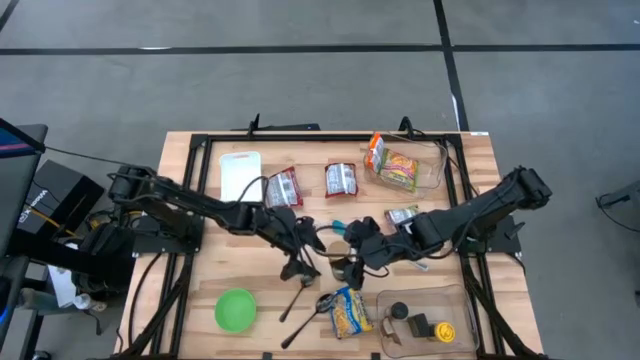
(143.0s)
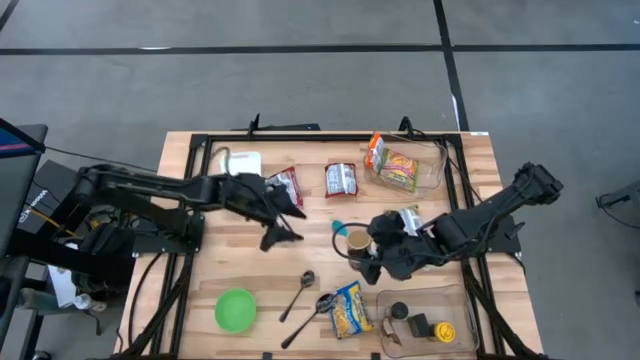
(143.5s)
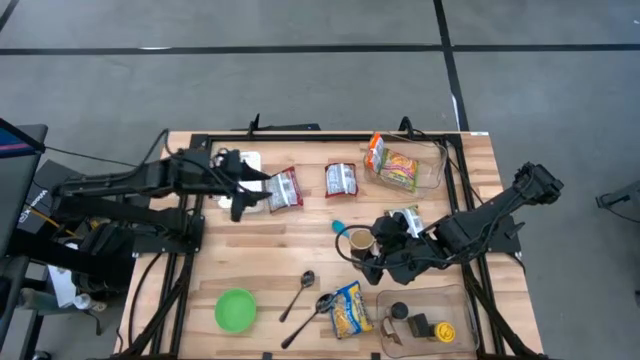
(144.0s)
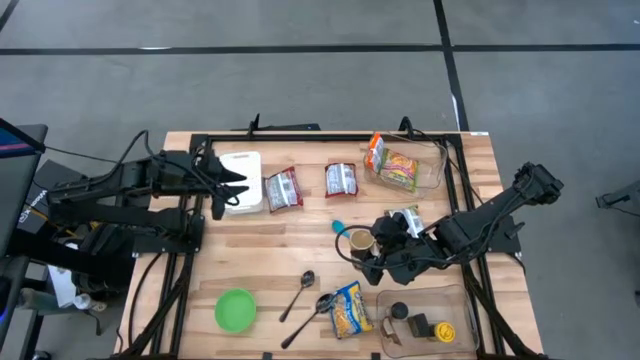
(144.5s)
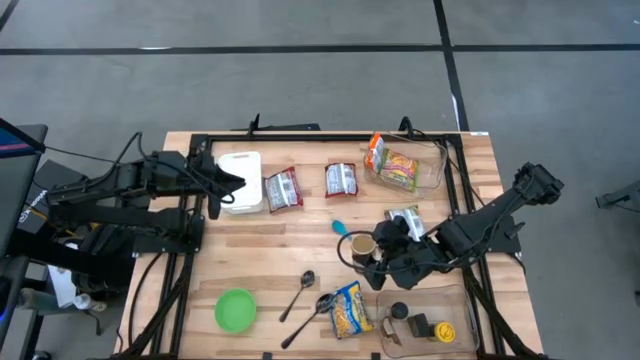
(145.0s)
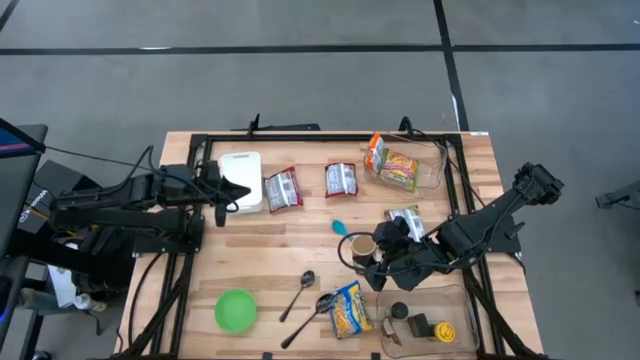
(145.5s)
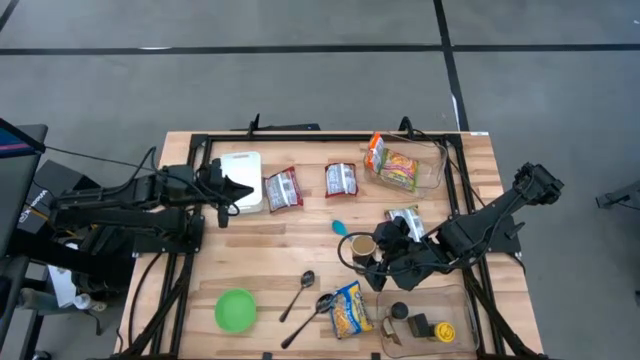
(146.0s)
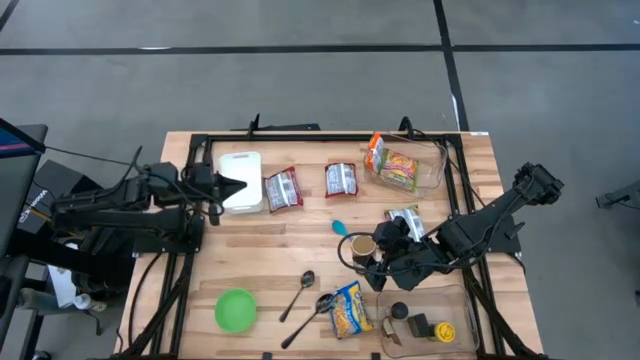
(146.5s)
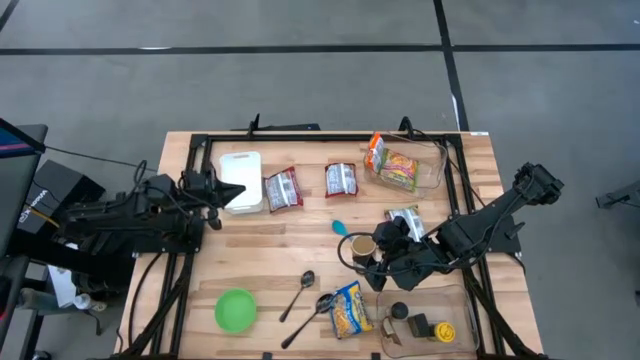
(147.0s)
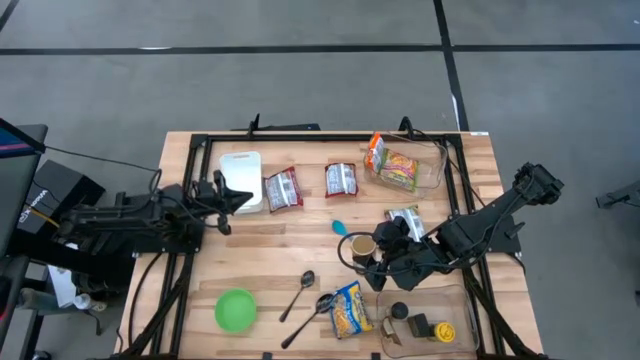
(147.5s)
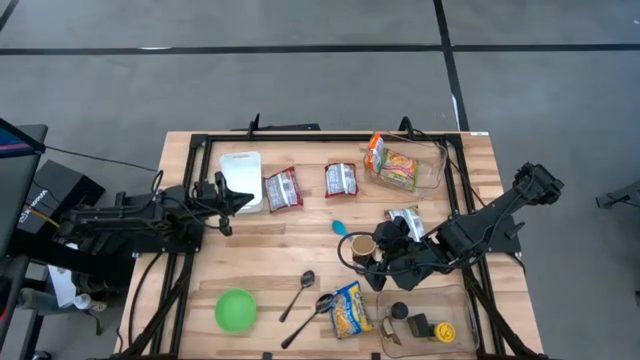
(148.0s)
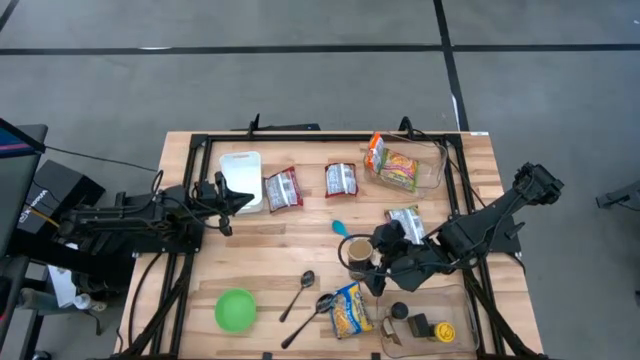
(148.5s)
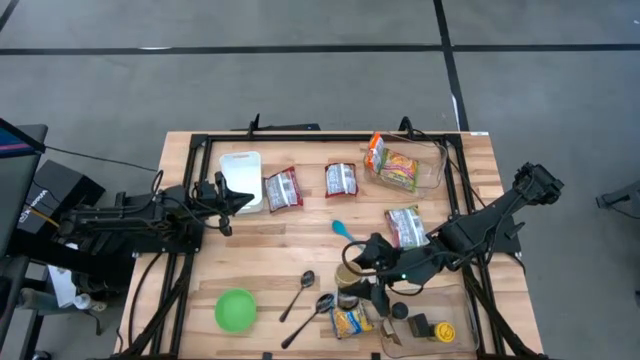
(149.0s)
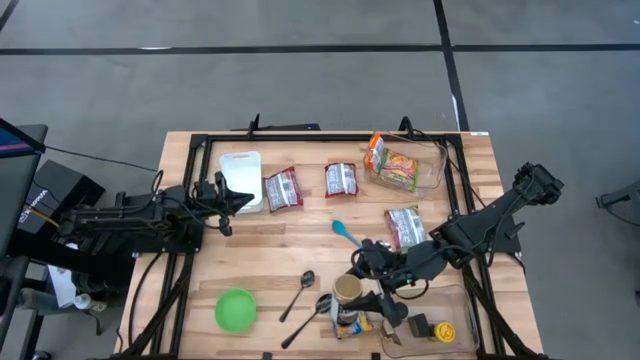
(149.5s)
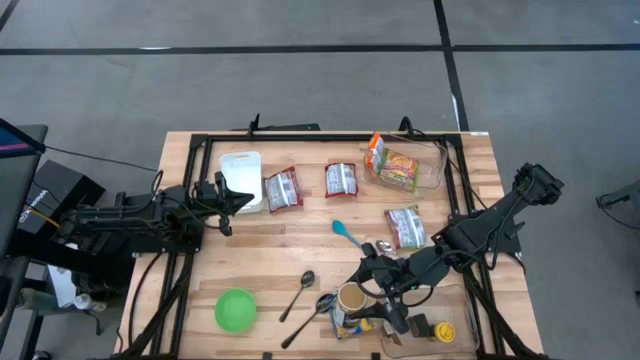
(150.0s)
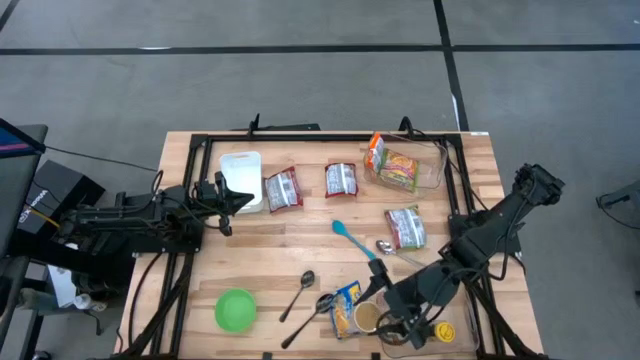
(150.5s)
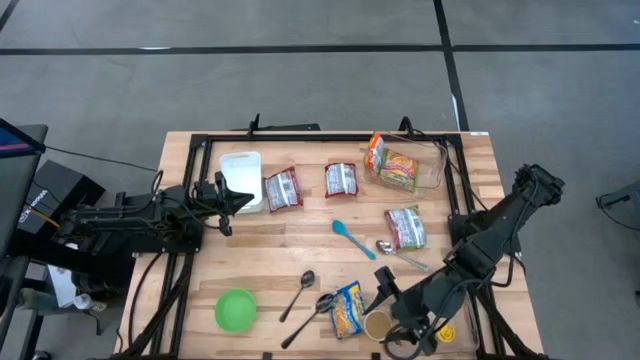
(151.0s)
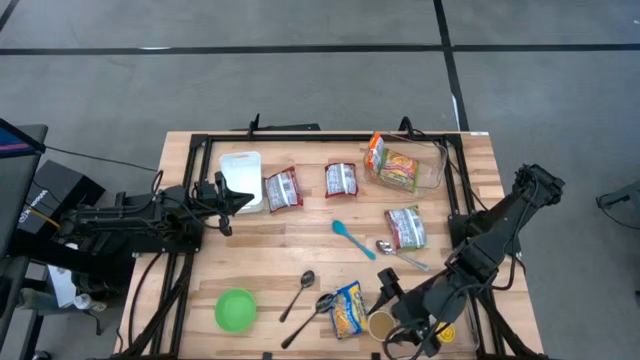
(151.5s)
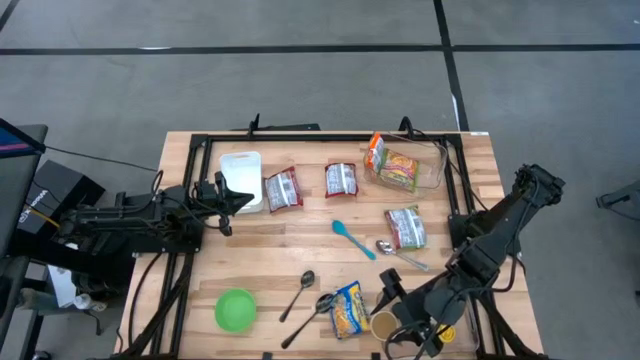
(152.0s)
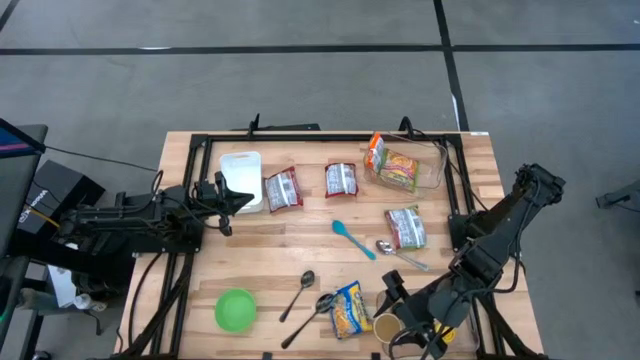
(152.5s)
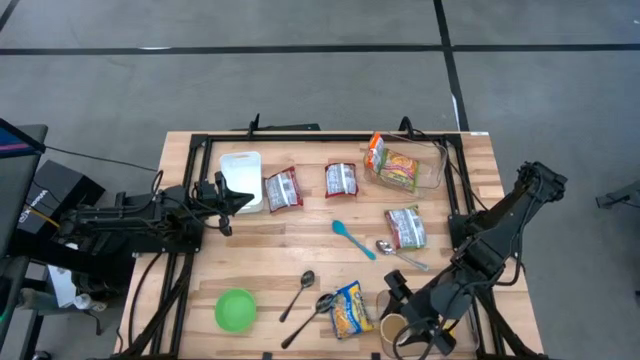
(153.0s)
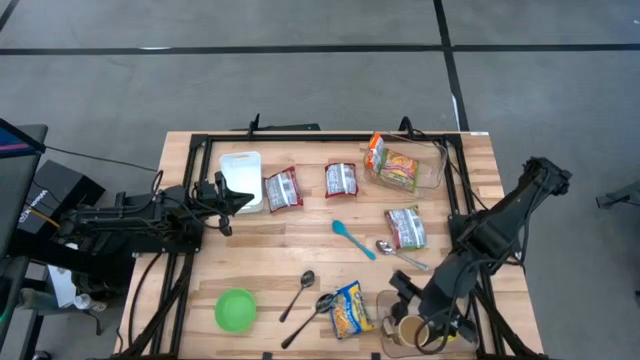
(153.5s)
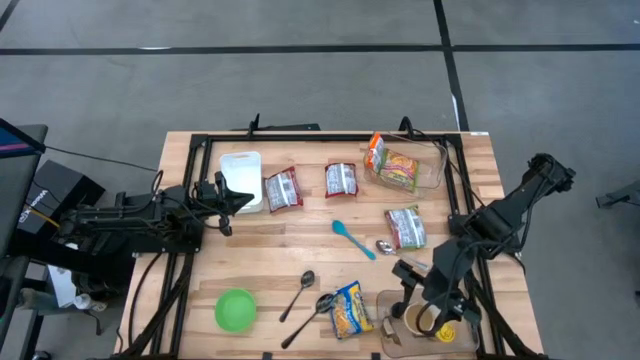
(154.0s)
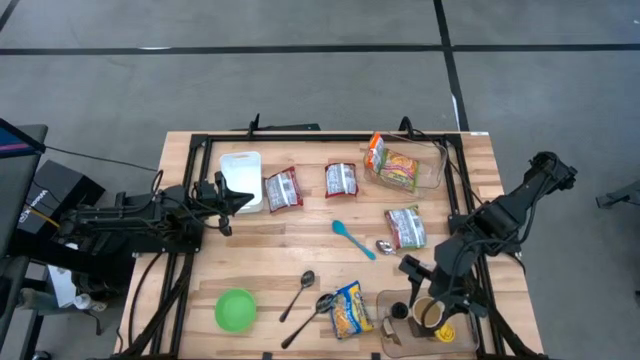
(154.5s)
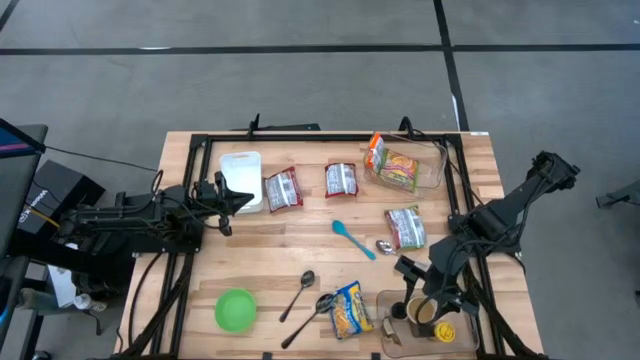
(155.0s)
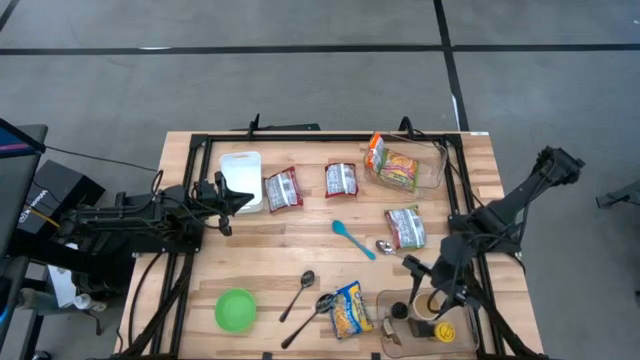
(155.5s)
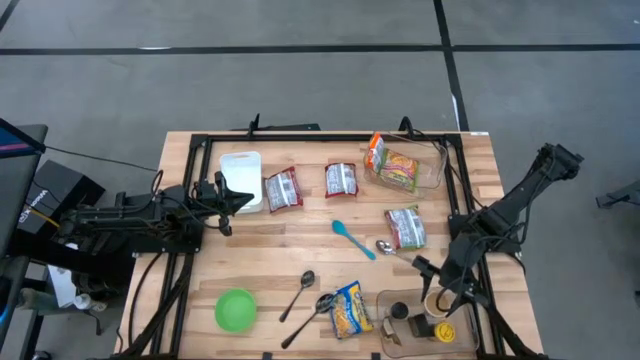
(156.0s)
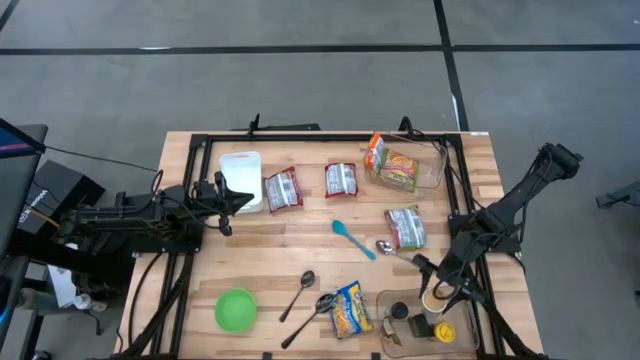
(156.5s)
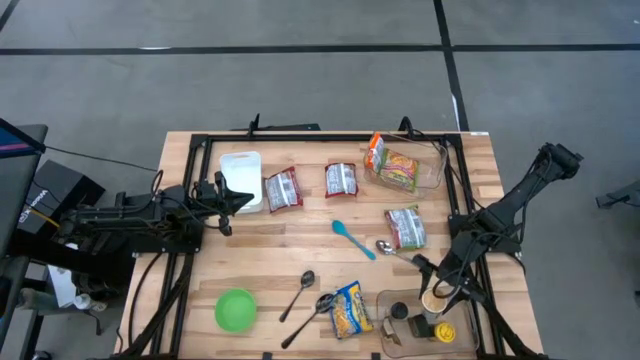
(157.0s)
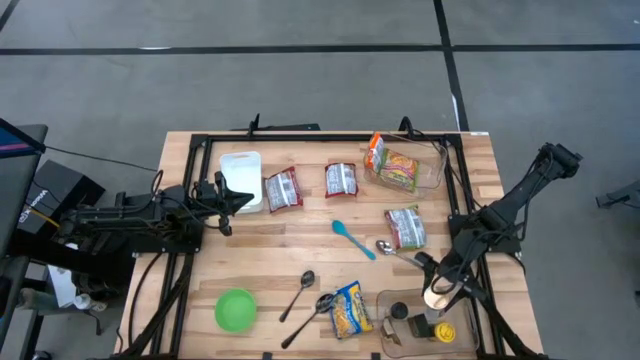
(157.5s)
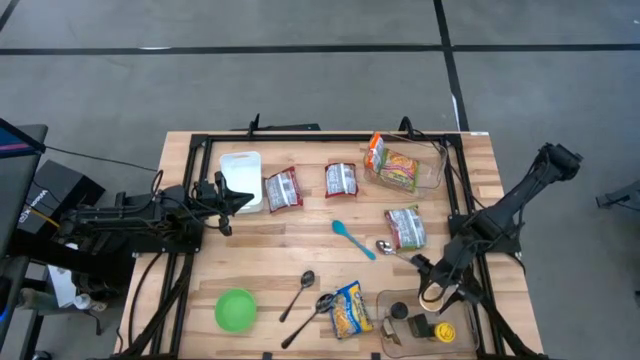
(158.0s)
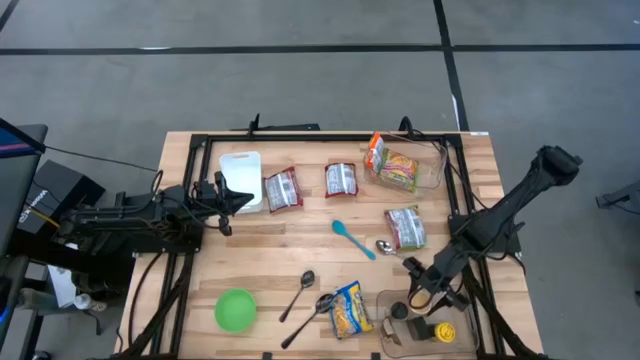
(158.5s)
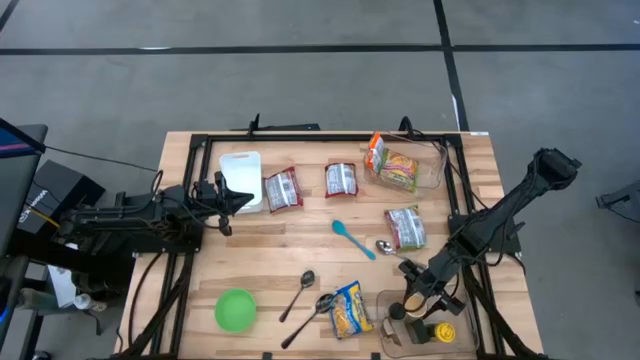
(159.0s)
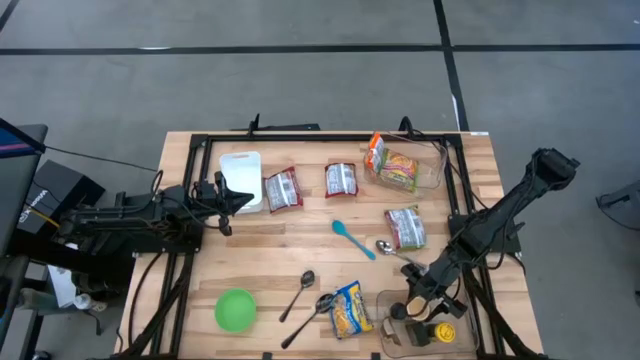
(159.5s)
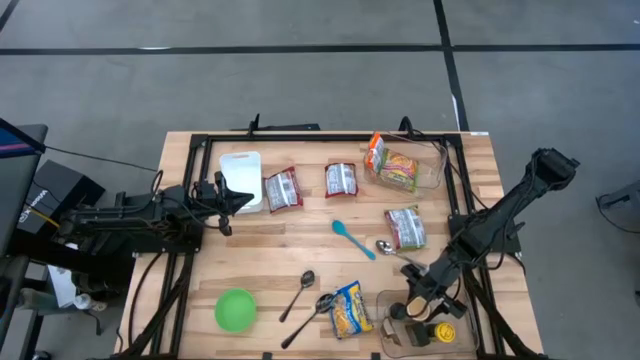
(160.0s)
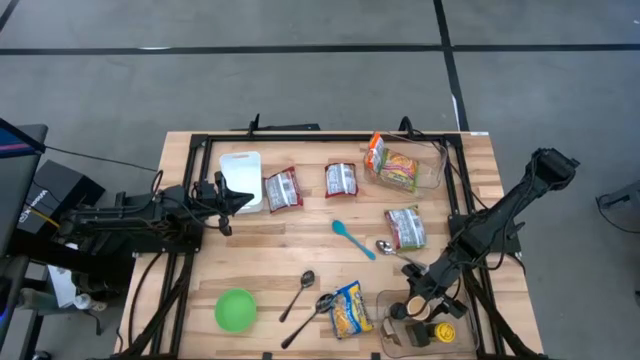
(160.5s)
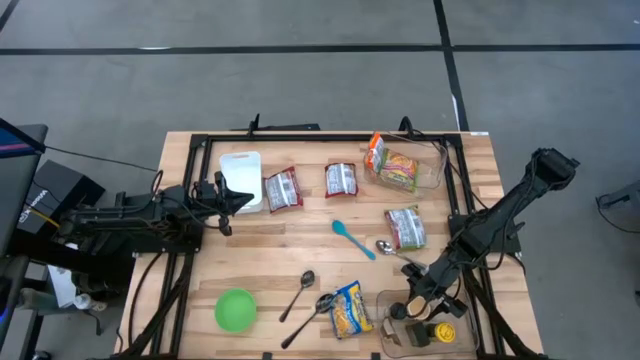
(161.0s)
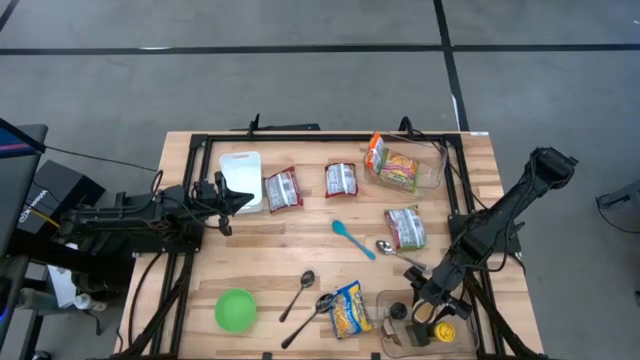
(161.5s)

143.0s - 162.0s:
Task: Pick & Place Food Item
Put the golden spice bottle into the bottom transparent bin

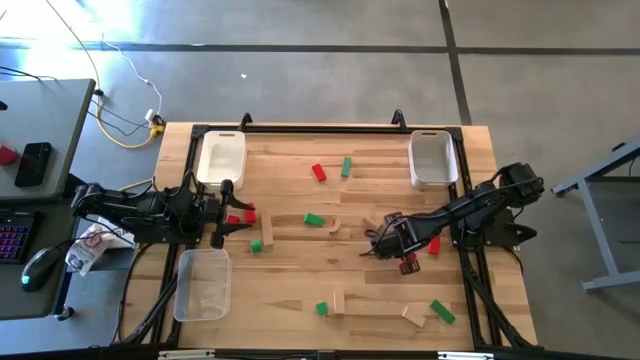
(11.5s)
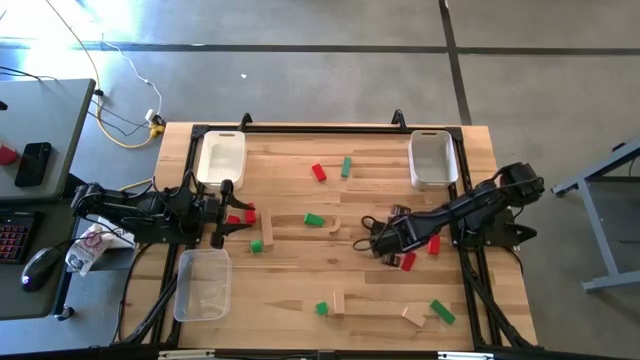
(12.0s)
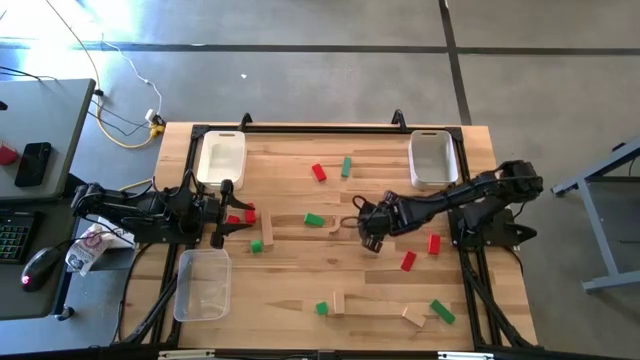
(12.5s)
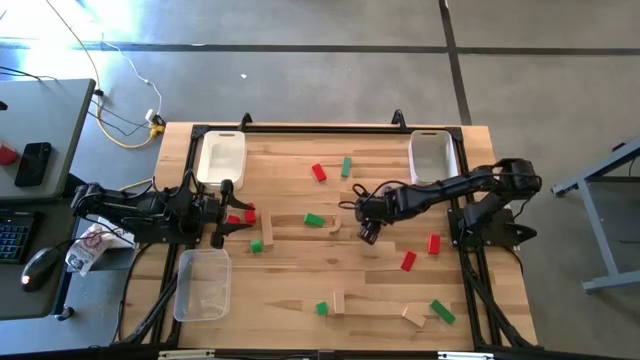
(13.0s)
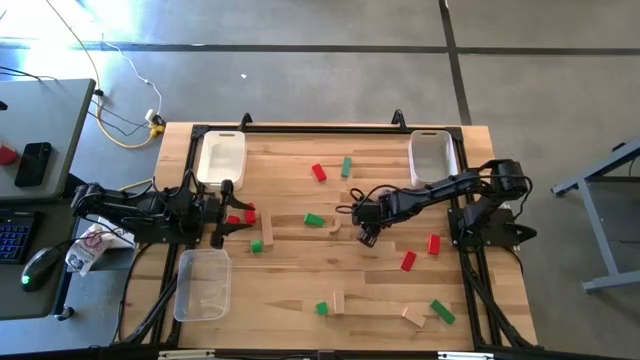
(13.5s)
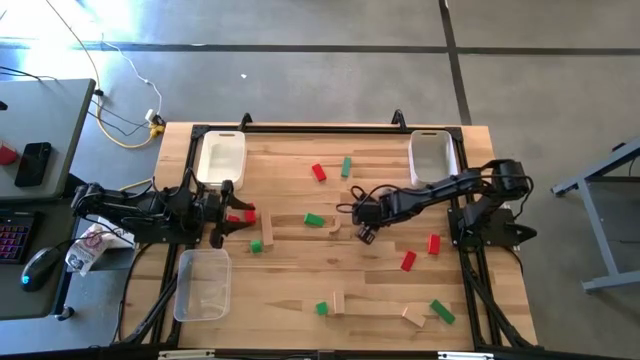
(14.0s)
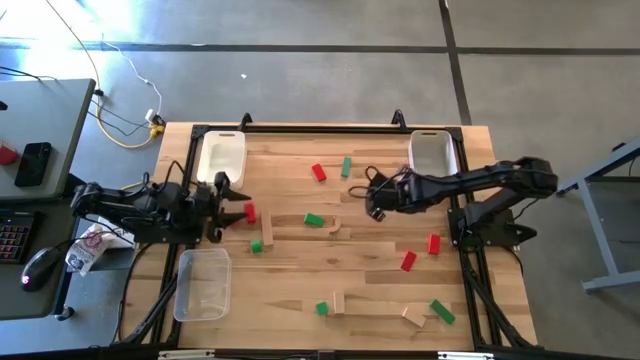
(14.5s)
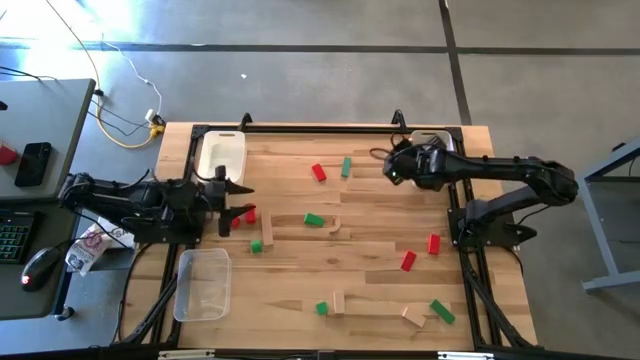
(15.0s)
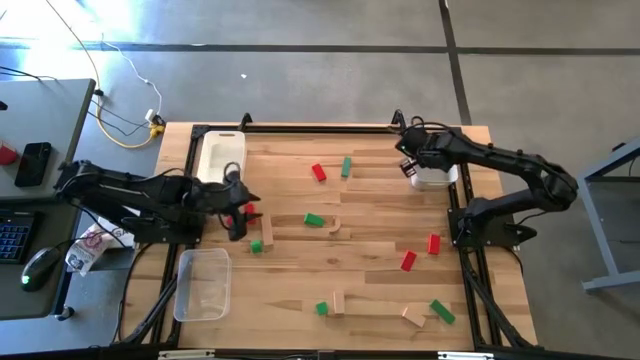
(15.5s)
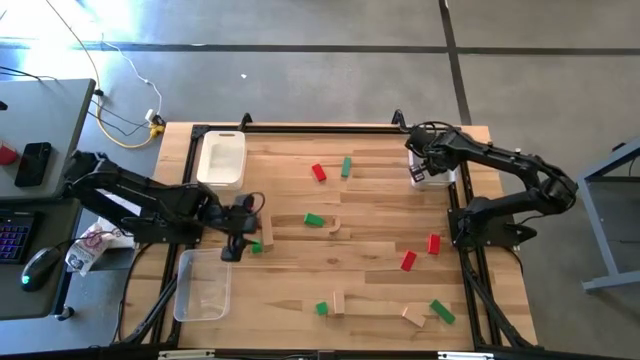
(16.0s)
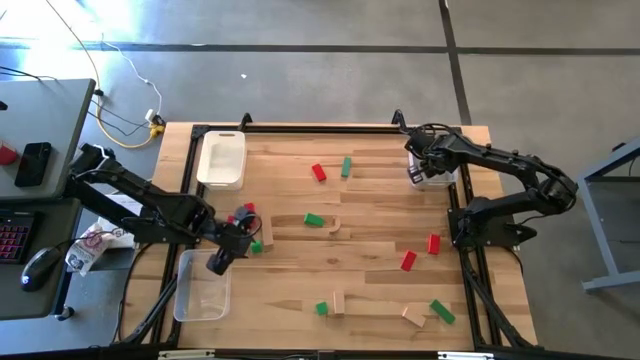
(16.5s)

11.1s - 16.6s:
Task: Sort & place blocks by color
Put the light brown block into the gray bin
